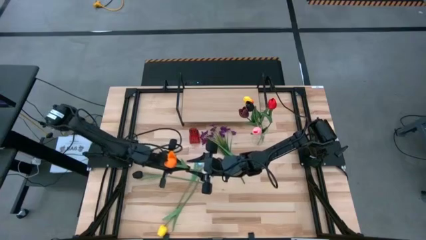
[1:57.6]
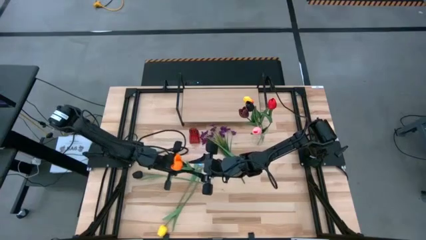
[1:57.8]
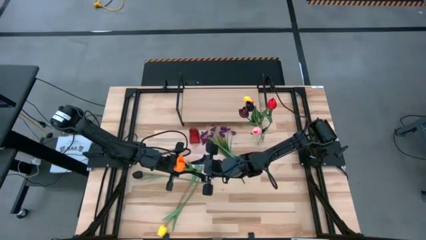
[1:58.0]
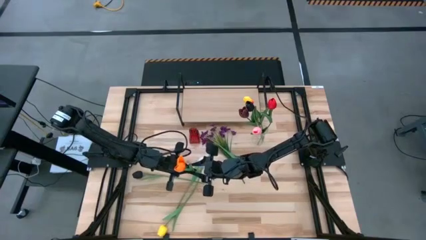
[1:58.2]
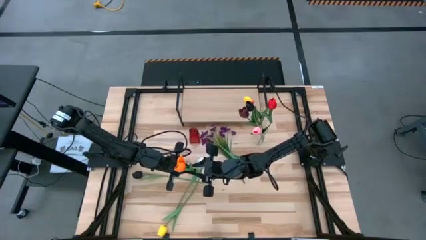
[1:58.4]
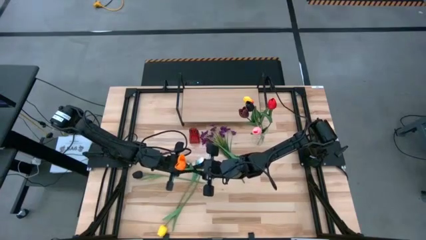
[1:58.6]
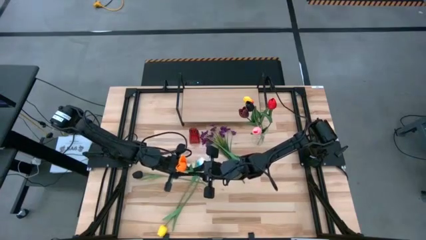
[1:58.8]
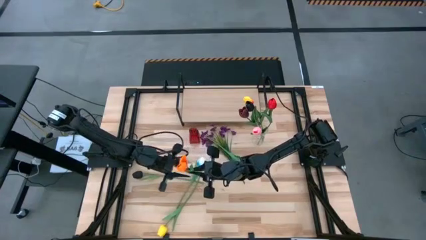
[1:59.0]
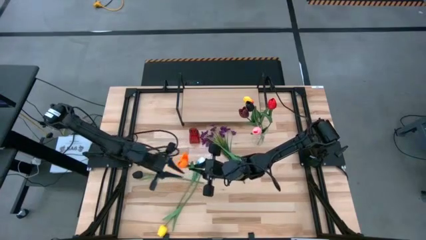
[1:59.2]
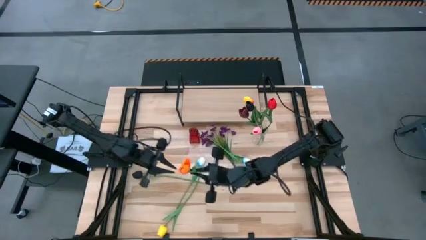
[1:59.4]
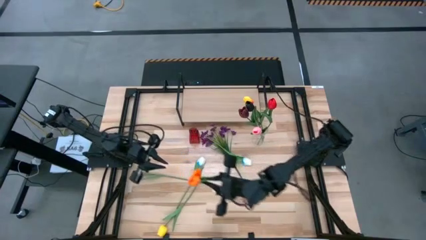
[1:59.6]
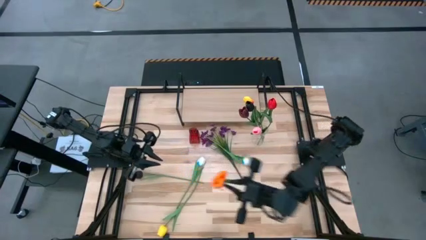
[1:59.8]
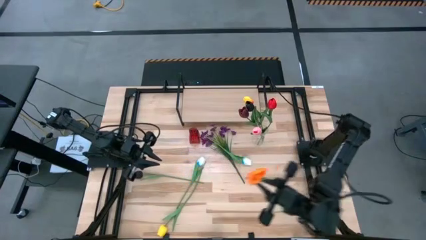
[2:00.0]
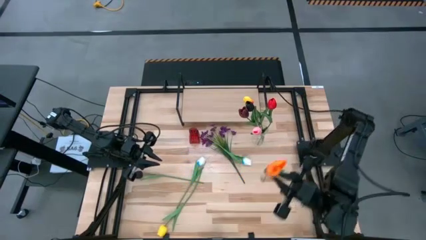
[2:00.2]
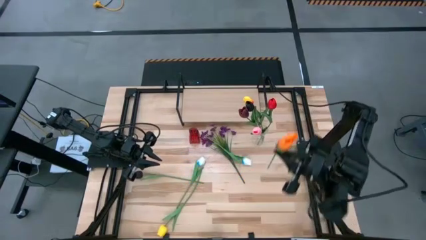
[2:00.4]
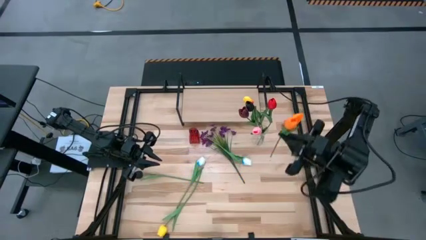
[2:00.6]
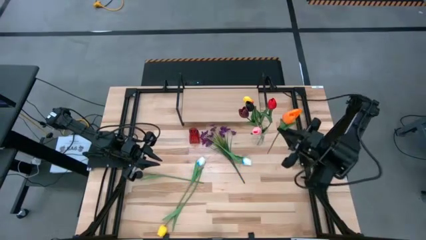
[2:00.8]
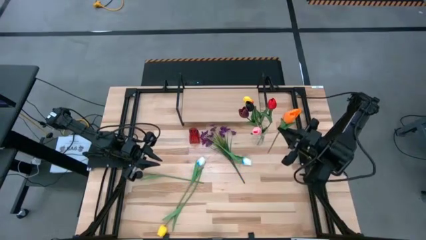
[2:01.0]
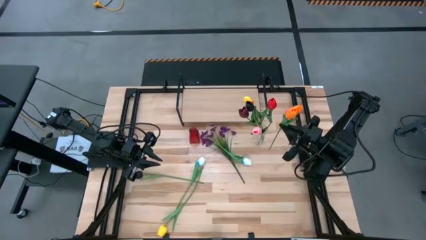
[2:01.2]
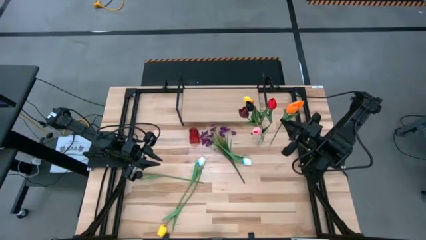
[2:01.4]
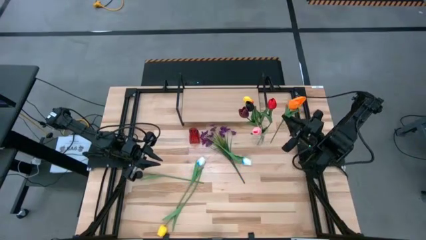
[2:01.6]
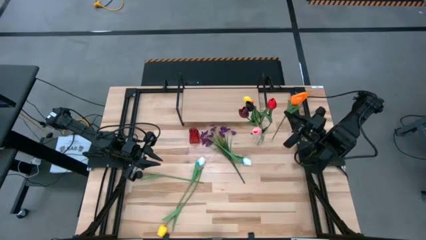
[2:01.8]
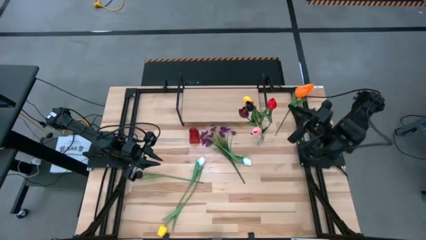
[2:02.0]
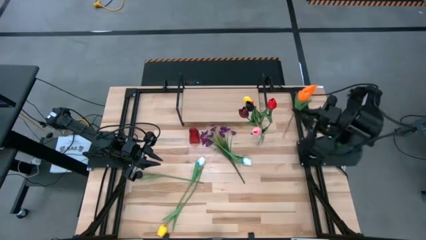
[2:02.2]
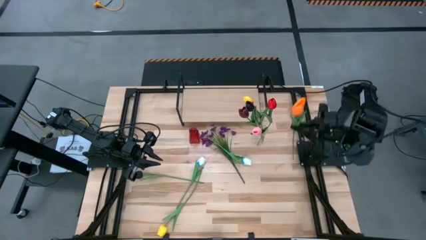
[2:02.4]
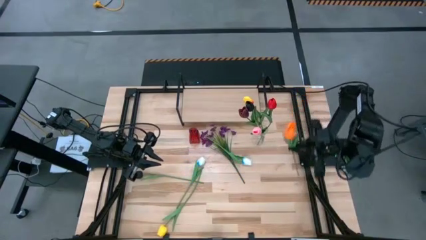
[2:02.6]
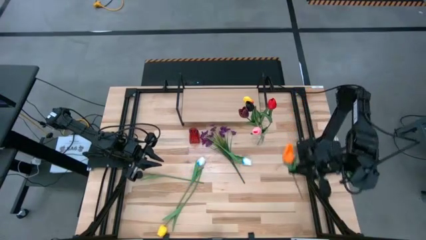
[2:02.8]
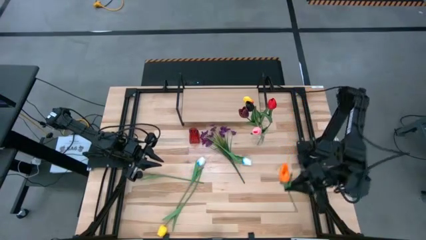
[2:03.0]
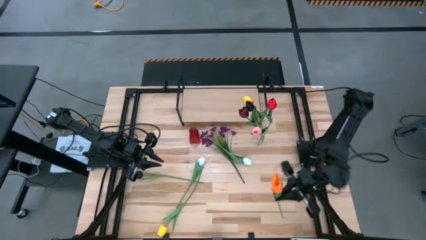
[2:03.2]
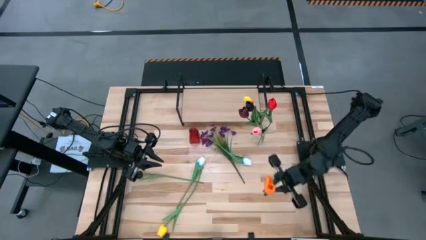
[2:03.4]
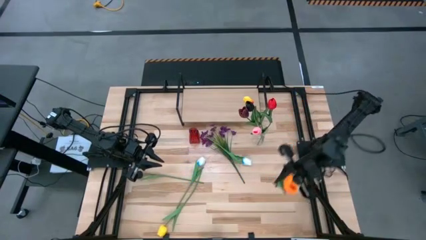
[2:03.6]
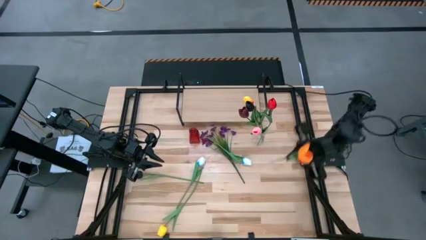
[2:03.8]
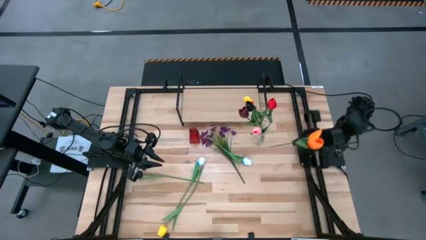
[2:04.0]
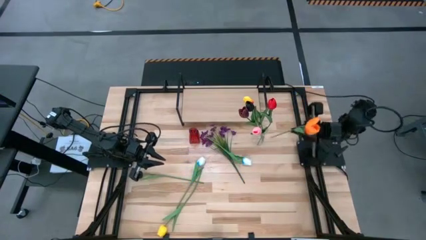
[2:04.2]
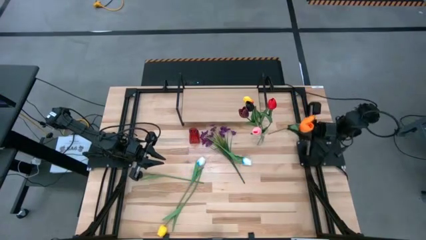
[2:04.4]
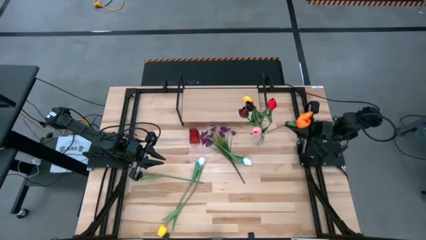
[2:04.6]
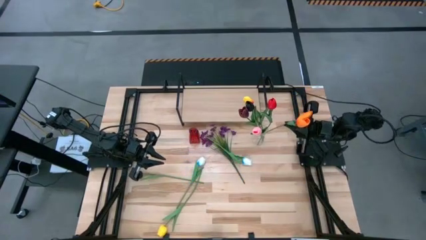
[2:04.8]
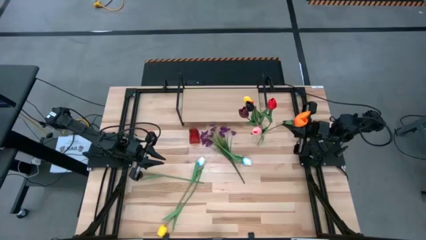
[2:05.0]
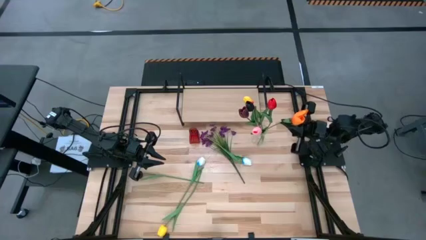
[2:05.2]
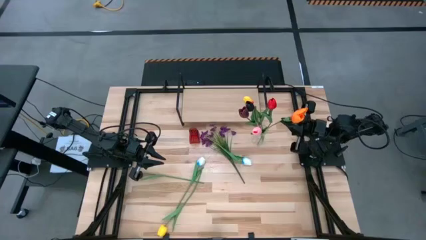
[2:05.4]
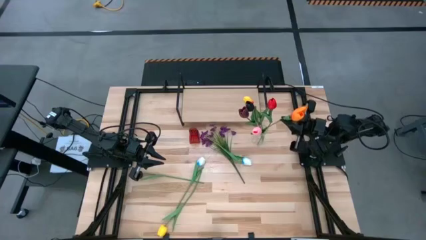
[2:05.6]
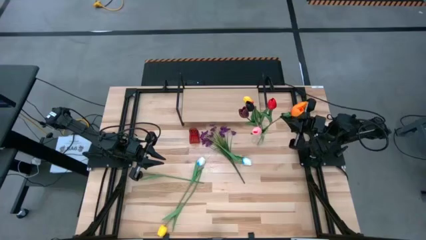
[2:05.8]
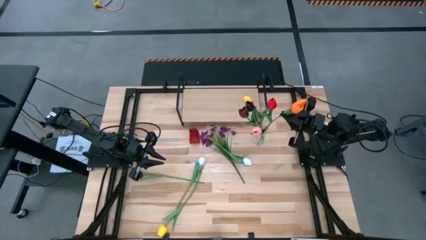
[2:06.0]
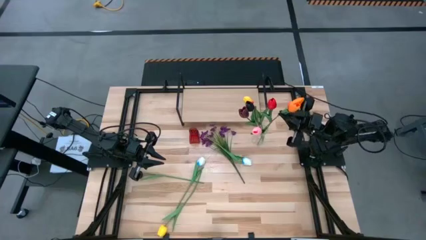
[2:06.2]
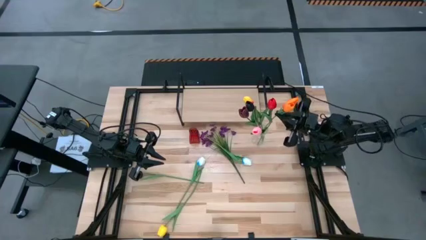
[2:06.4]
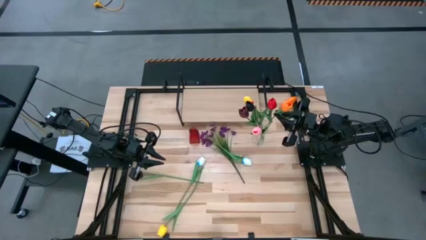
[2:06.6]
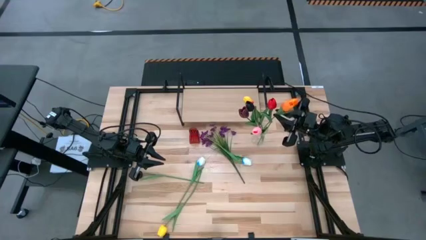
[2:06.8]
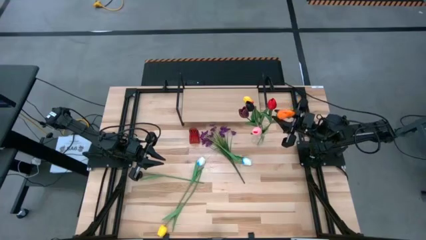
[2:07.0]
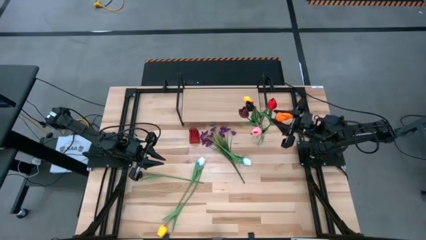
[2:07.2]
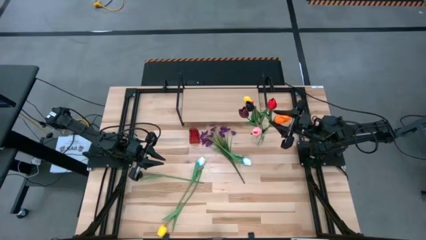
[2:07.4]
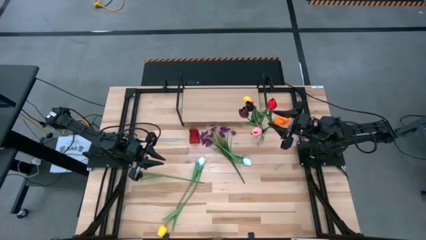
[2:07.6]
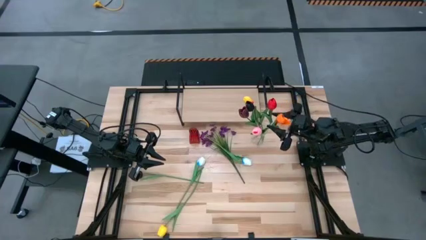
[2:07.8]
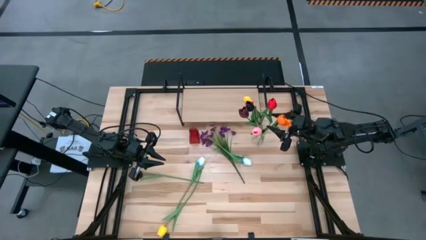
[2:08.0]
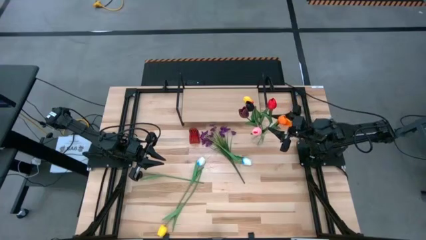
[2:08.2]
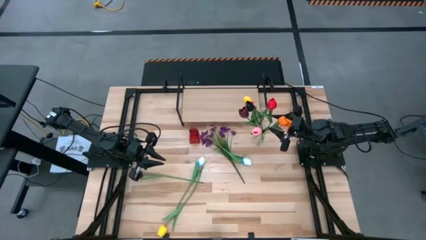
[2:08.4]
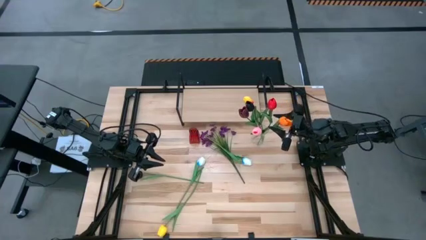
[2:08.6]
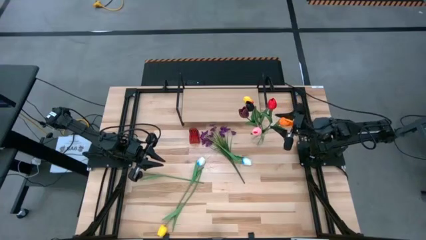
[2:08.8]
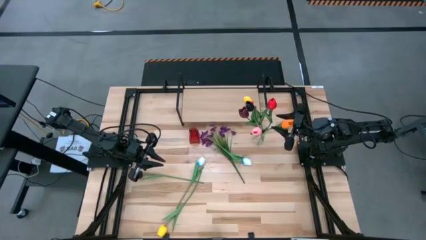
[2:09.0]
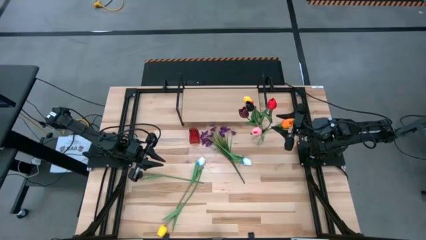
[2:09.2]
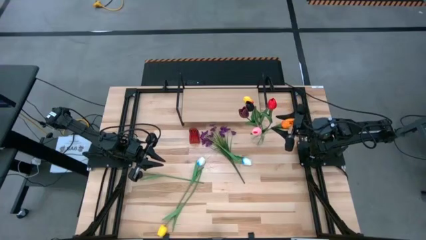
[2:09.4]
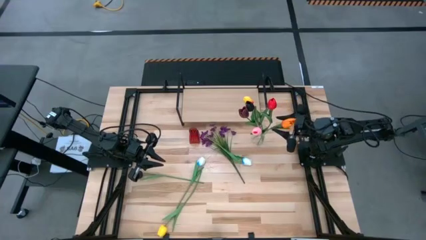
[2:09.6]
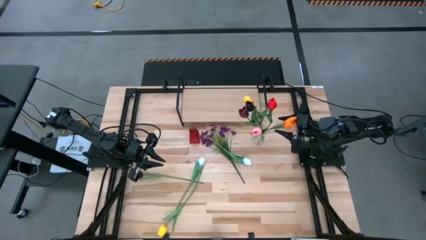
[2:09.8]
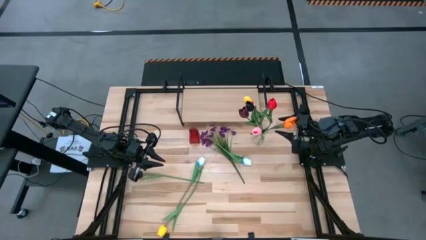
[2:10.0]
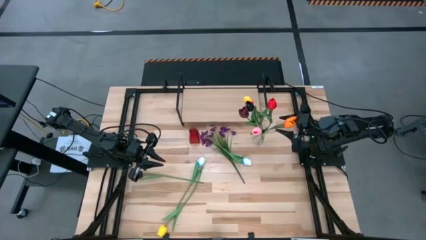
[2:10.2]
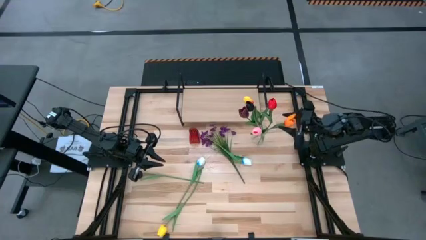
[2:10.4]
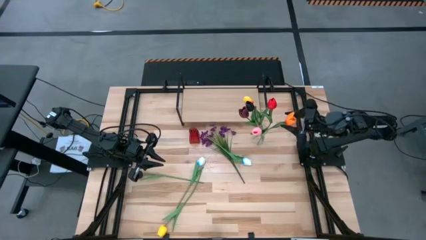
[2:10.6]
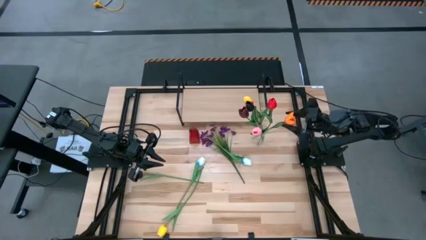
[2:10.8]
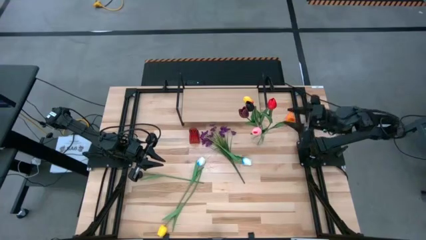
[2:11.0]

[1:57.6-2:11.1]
Task: Pick and place flowers into a vace then onto a shelf
Put the orange flower into the transparent vase
